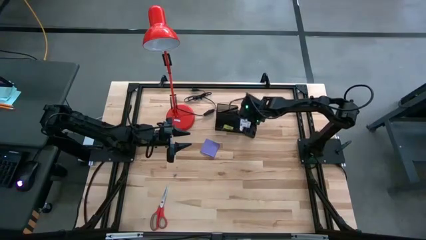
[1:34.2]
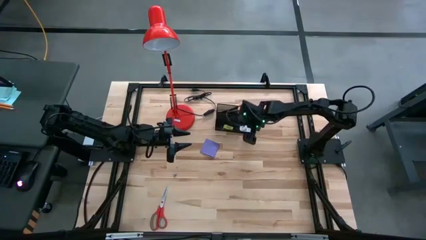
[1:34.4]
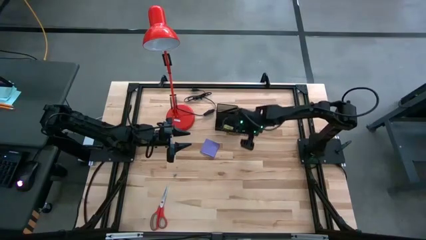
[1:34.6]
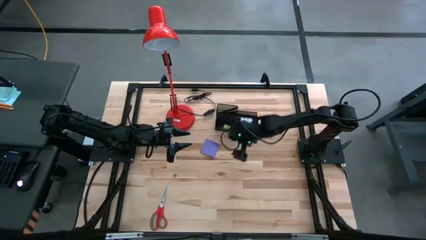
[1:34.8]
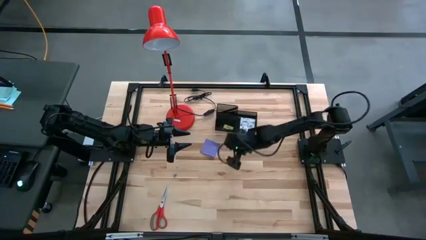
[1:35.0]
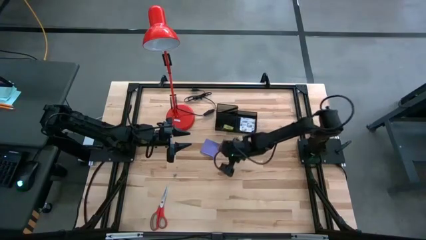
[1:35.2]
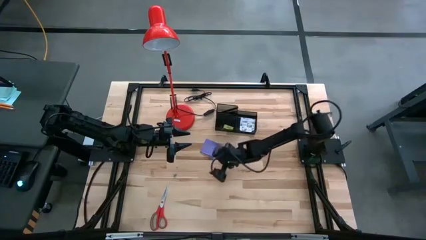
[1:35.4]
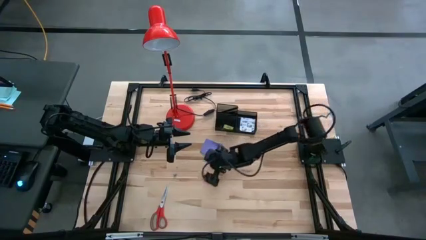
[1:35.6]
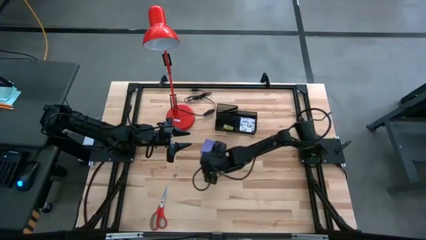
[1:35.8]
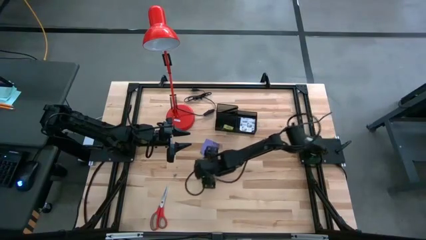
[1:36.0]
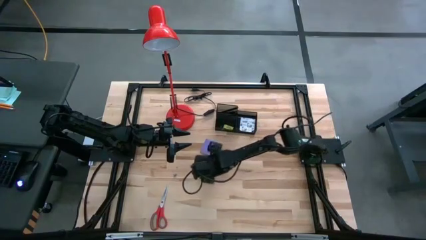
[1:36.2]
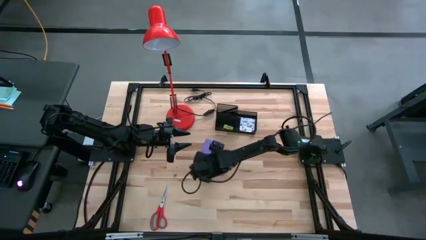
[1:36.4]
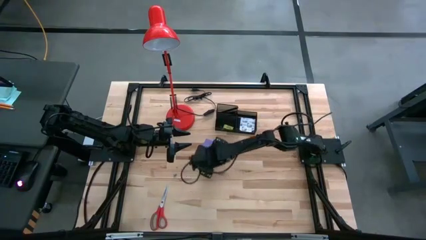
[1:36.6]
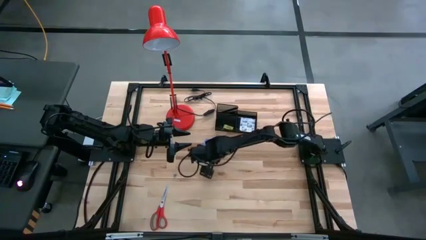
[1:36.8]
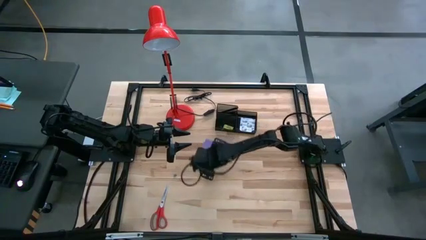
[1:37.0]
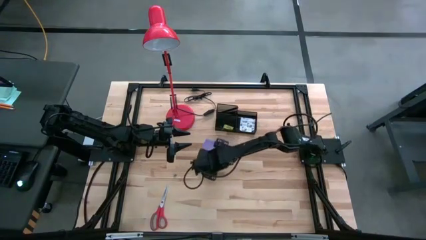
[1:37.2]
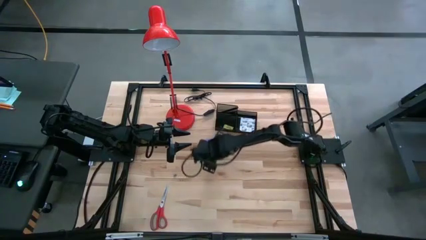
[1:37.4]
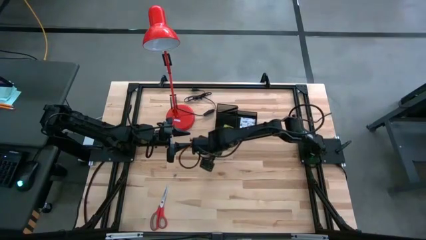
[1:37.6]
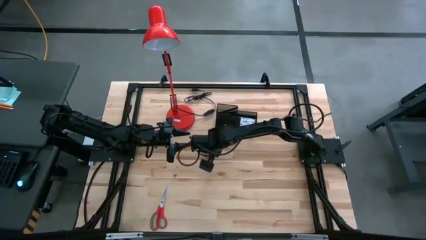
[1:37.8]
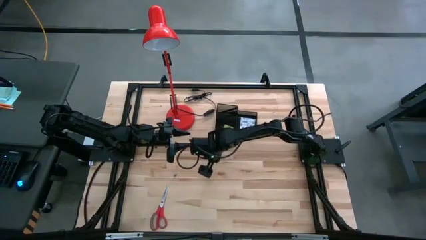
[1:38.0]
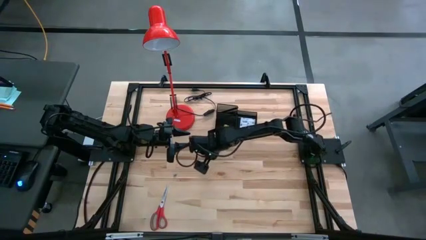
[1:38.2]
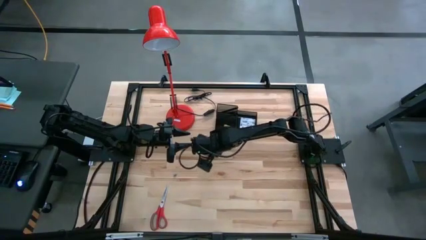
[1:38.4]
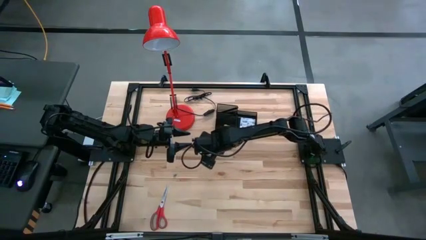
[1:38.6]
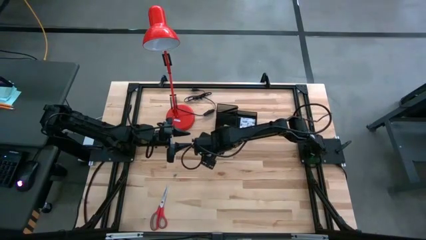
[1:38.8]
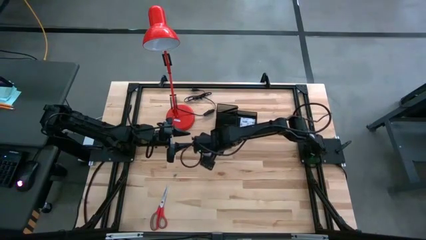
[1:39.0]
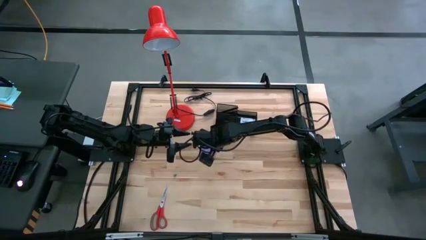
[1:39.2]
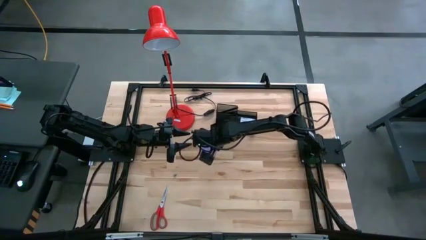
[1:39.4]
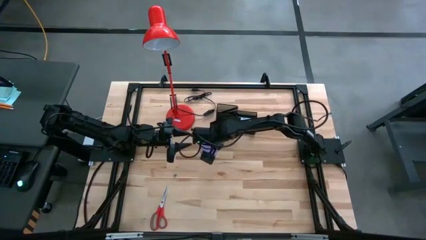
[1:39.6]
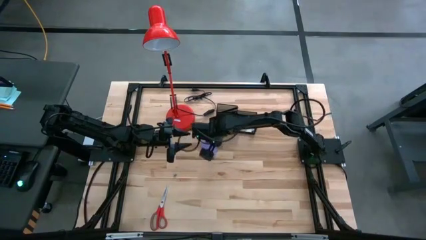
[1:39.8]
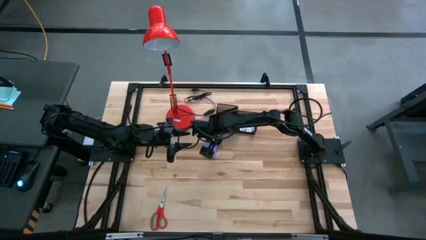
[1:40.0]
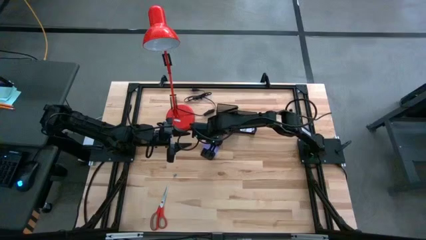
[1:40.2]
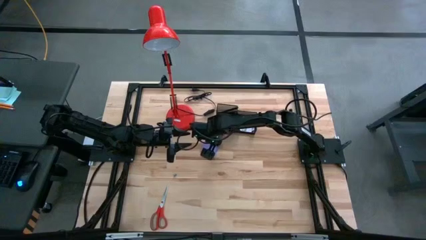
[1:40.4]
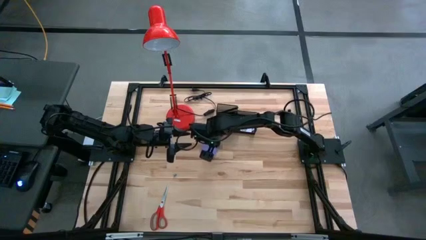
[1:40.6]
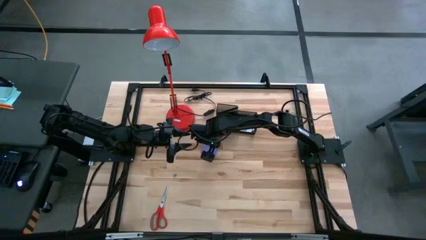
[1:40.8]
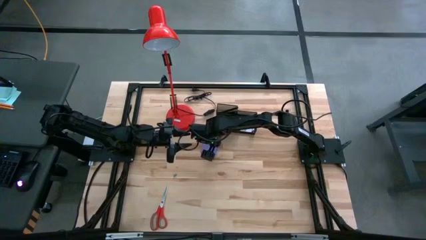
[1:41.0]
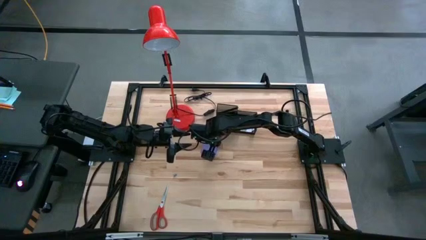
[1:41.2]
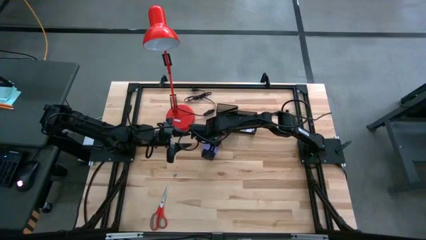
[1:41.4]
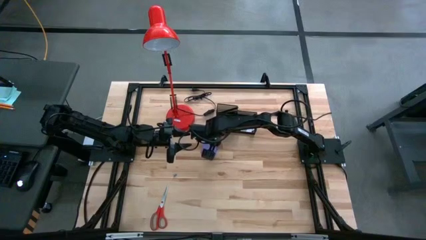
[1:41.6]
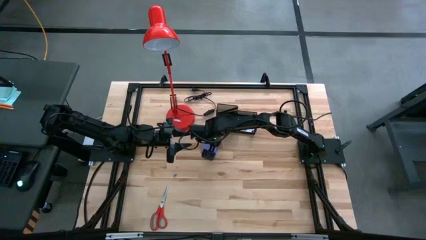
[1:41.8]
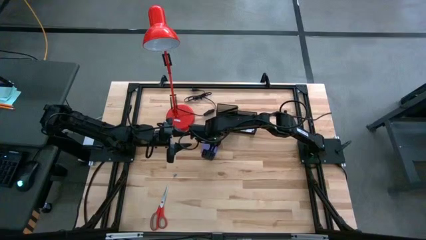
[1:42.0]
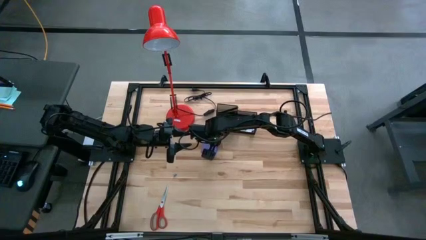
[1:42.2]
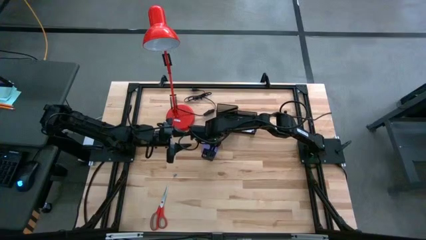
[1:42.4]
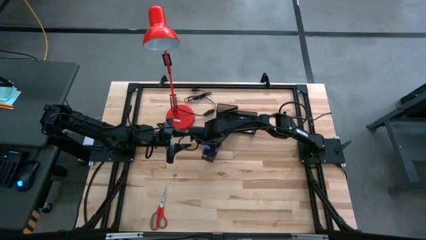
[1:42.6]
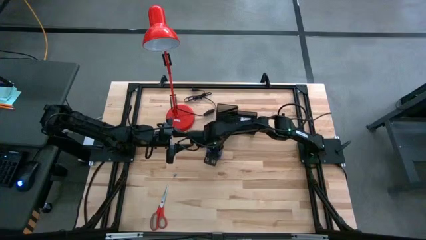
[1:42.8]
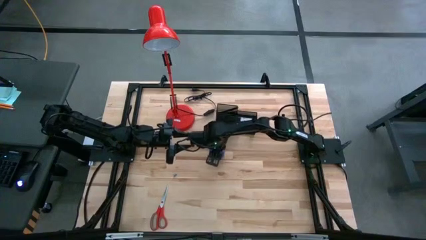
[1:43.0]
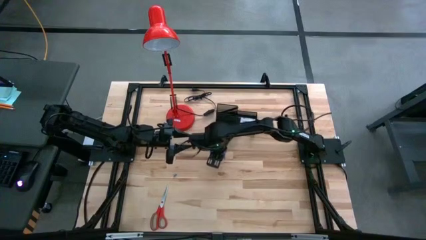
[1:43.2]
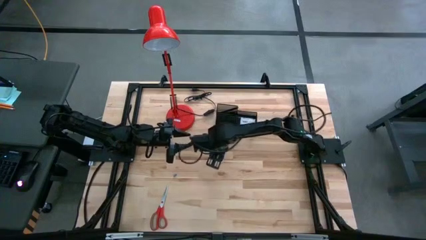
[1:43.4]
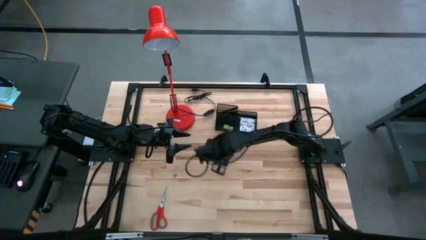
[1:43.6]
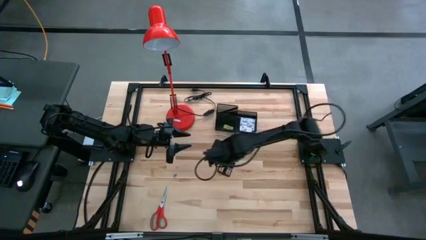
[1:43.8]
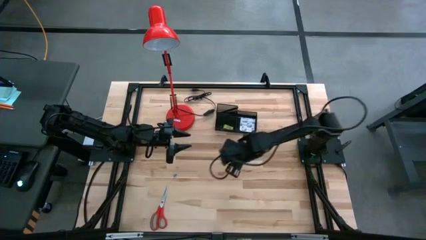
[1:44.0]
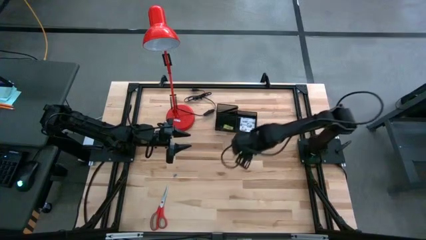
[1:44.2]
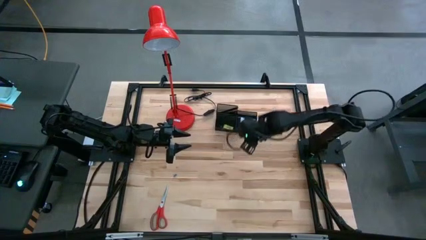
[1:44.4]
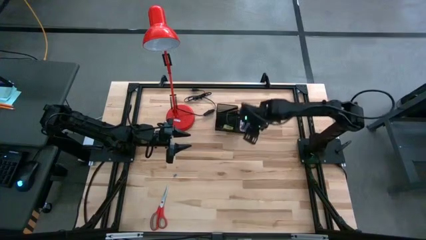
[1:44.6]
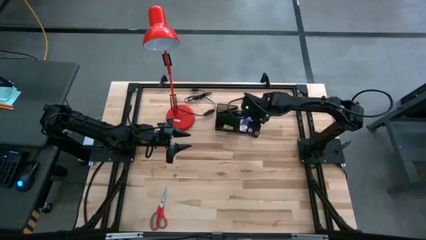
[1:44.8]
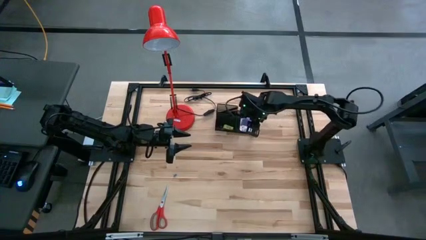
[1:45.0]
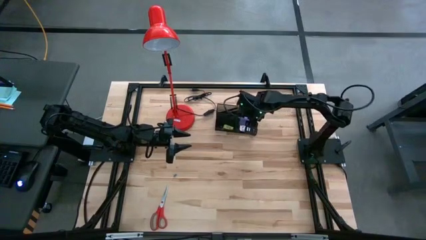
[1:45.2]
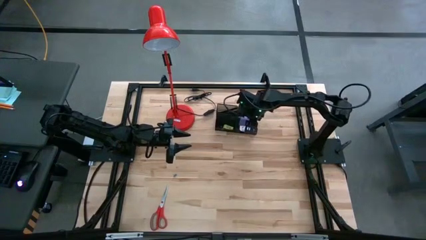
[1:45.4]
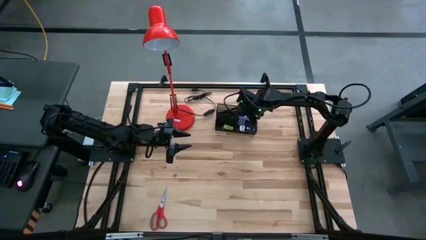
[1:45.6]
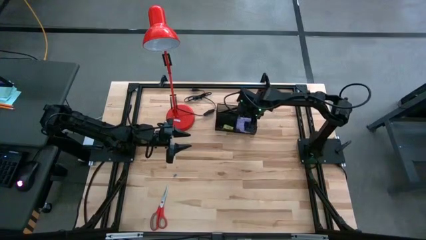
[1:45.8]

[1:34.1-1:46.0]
Task: Pick and place office supplies into organizer
Put the purple sticky notes into the black desk organizer
